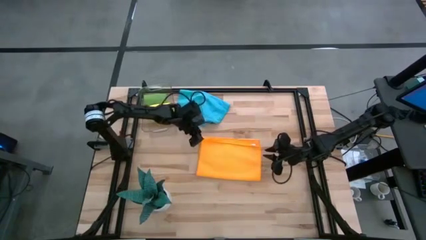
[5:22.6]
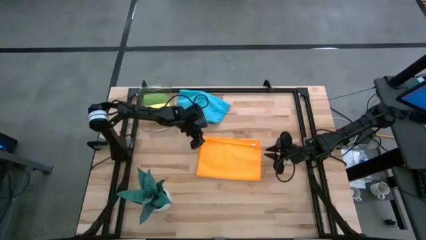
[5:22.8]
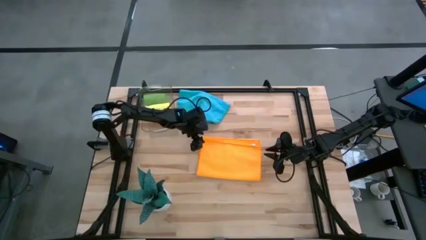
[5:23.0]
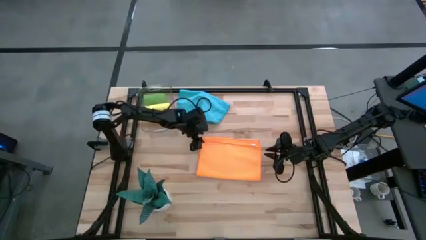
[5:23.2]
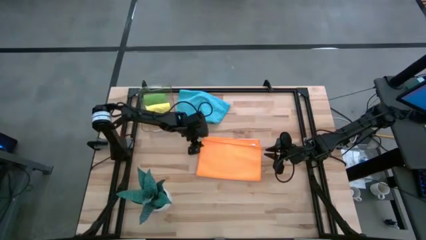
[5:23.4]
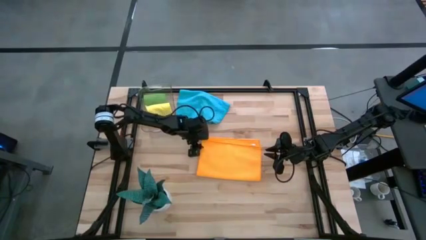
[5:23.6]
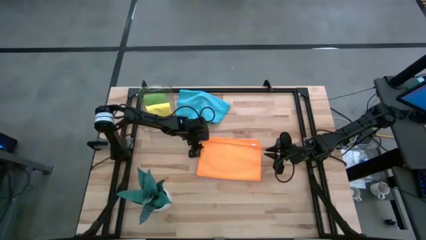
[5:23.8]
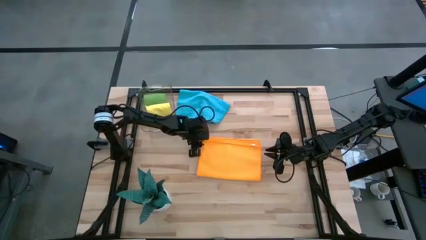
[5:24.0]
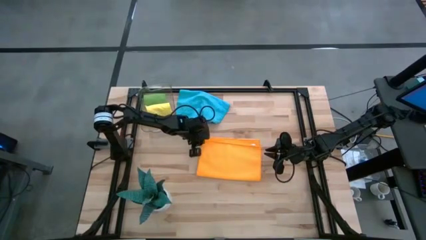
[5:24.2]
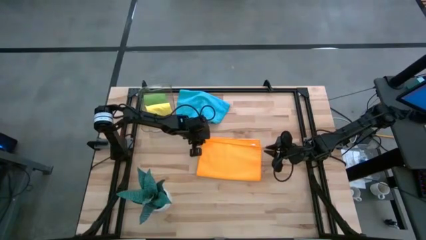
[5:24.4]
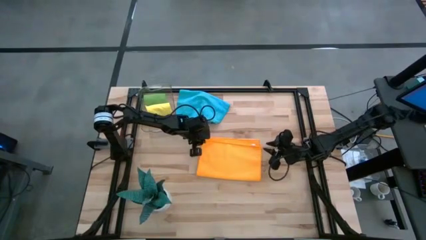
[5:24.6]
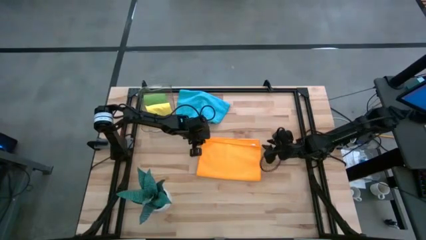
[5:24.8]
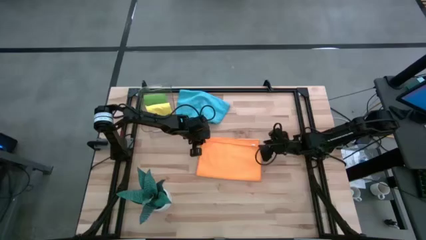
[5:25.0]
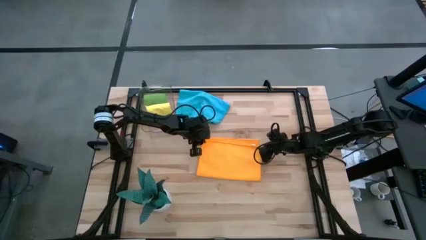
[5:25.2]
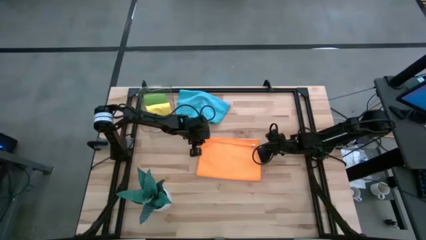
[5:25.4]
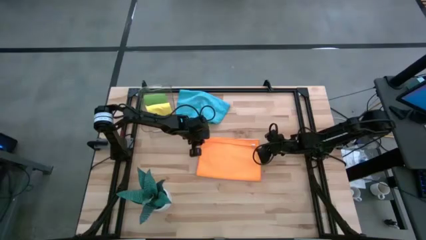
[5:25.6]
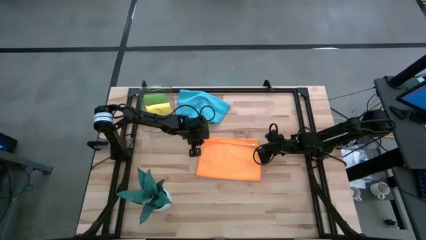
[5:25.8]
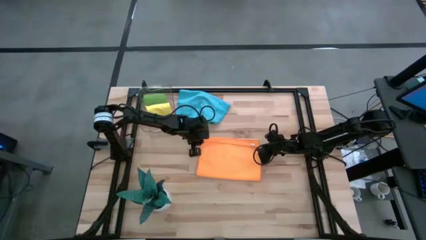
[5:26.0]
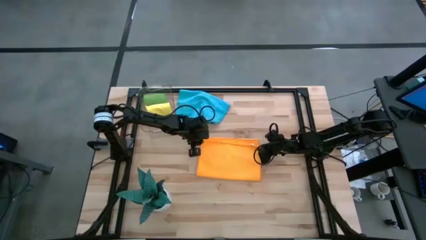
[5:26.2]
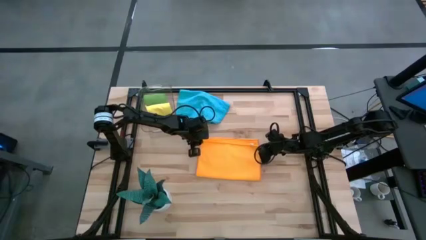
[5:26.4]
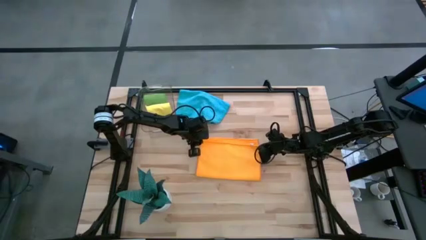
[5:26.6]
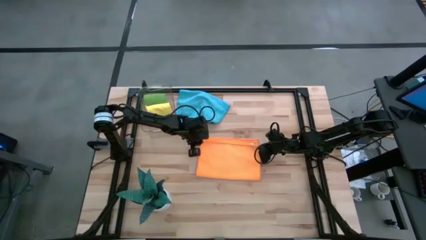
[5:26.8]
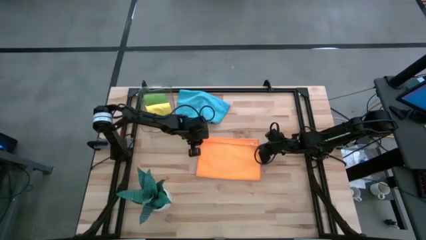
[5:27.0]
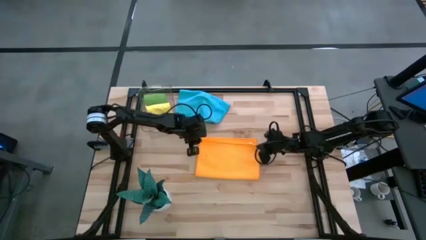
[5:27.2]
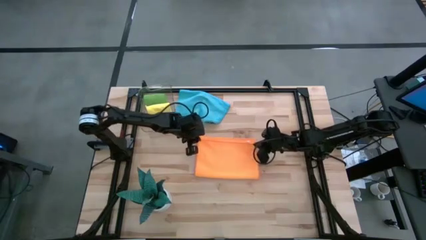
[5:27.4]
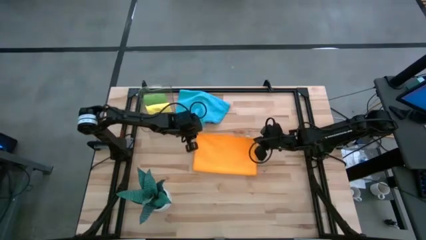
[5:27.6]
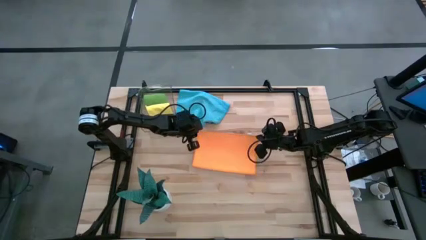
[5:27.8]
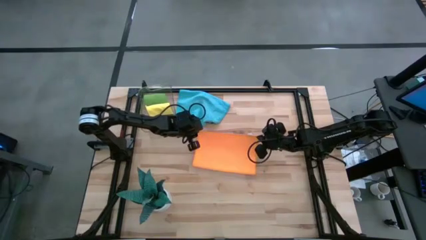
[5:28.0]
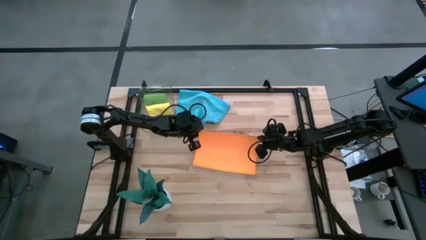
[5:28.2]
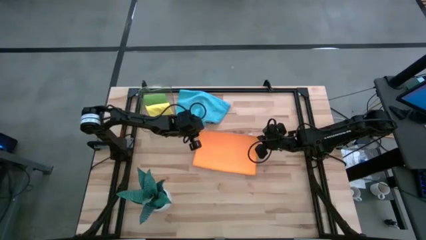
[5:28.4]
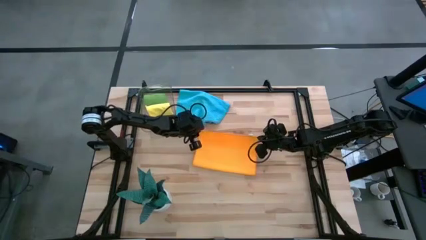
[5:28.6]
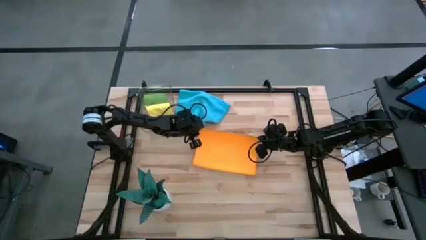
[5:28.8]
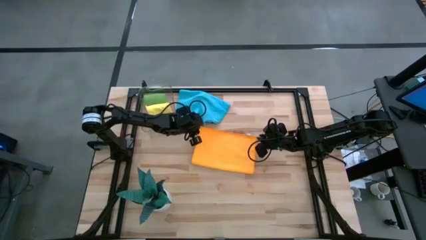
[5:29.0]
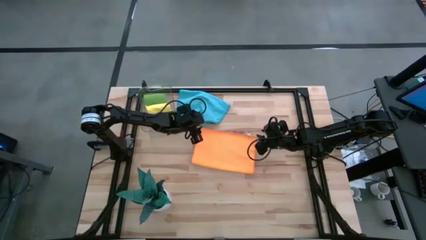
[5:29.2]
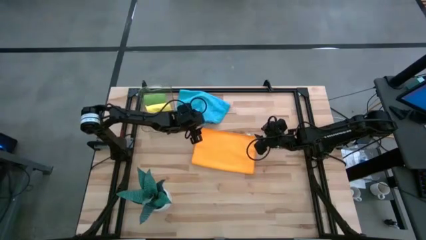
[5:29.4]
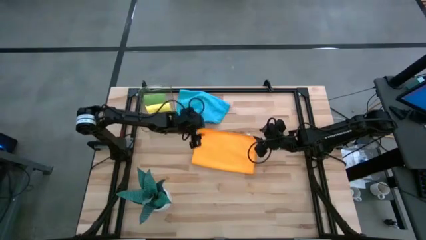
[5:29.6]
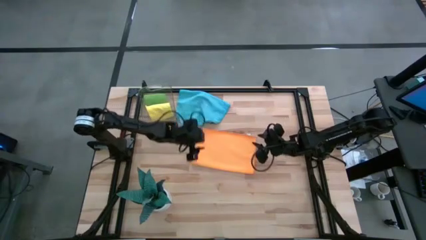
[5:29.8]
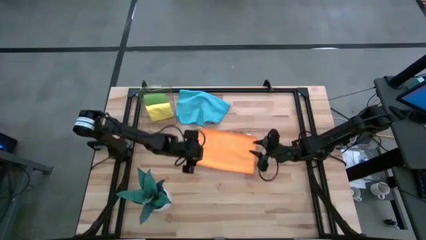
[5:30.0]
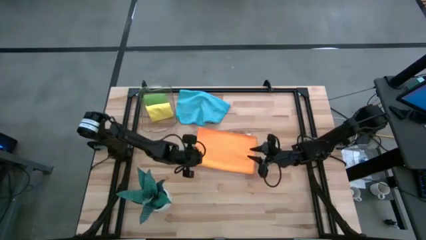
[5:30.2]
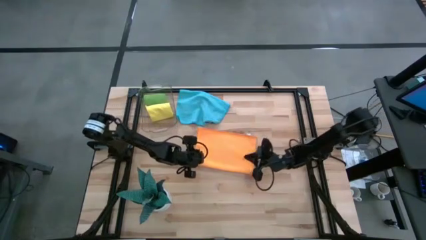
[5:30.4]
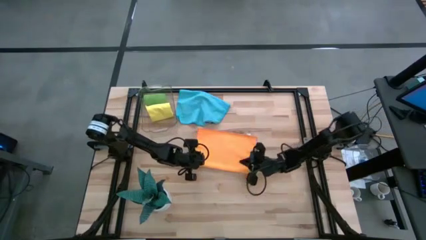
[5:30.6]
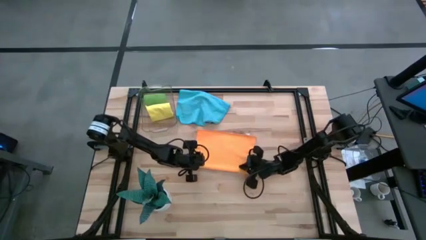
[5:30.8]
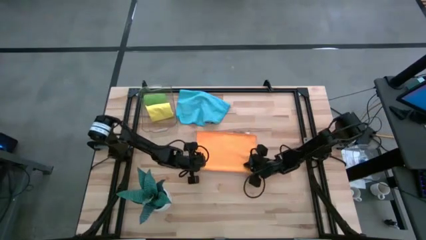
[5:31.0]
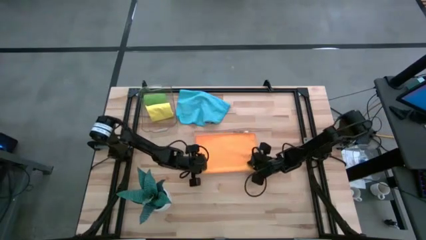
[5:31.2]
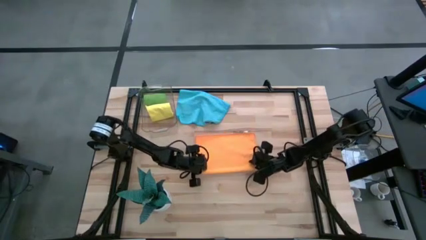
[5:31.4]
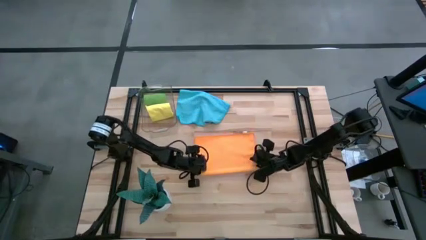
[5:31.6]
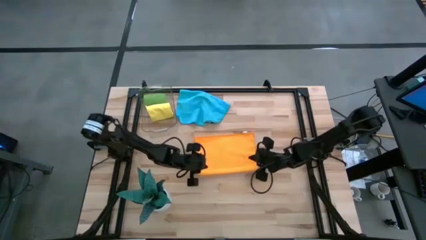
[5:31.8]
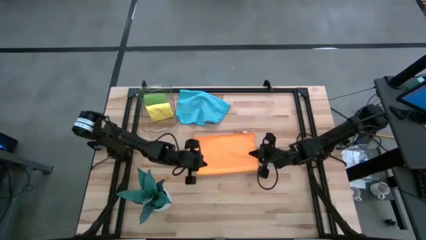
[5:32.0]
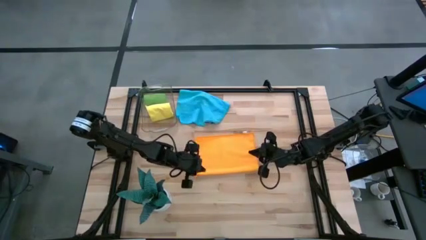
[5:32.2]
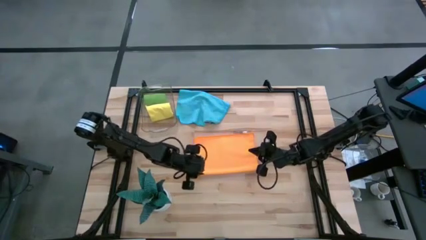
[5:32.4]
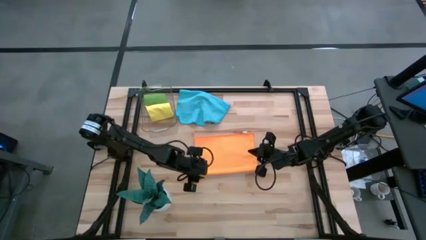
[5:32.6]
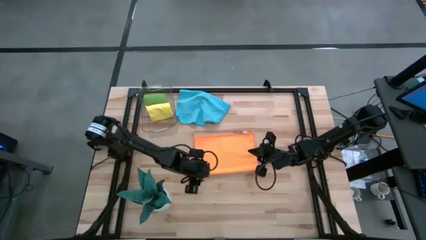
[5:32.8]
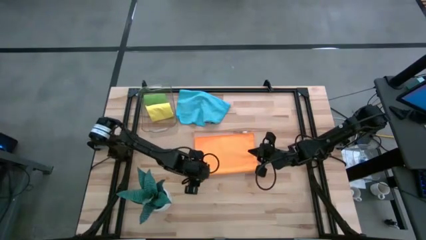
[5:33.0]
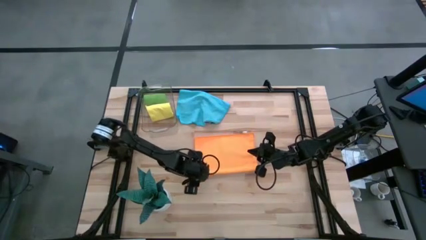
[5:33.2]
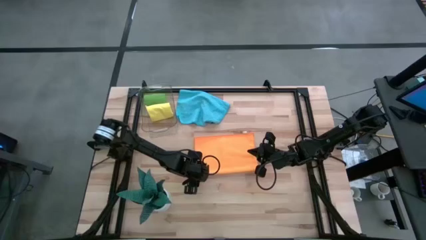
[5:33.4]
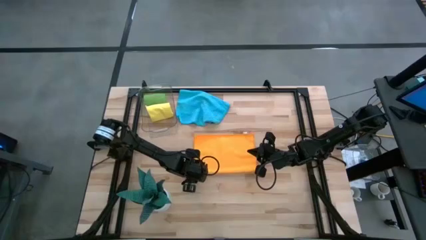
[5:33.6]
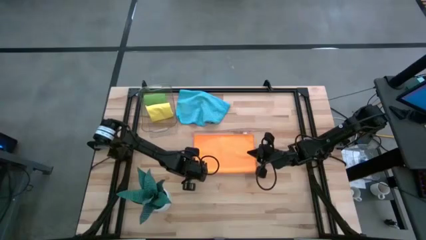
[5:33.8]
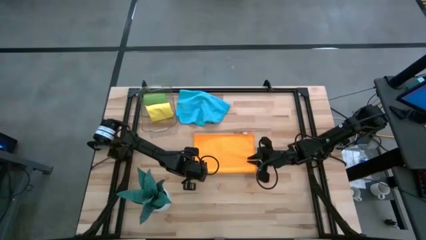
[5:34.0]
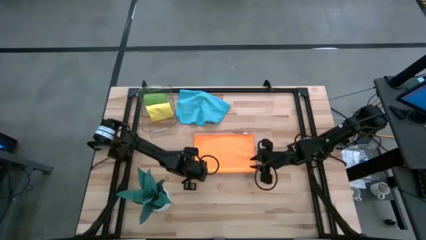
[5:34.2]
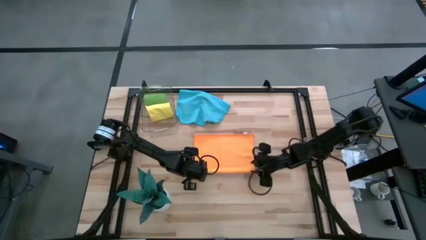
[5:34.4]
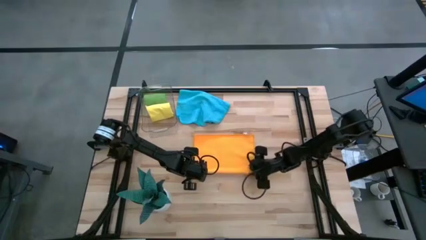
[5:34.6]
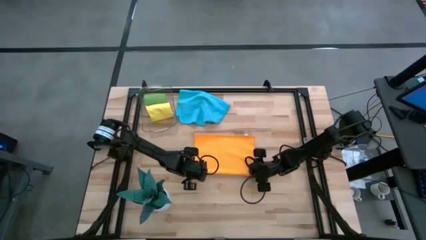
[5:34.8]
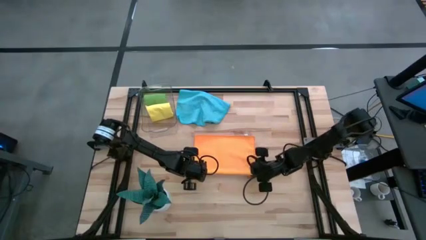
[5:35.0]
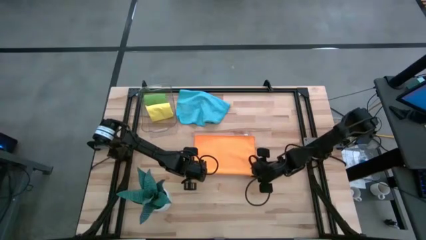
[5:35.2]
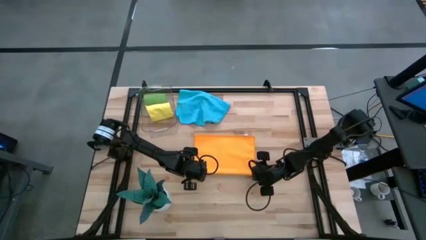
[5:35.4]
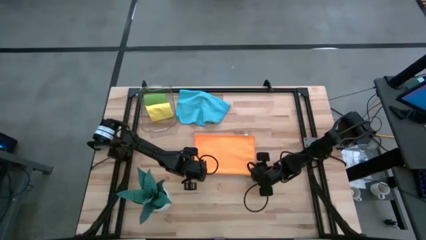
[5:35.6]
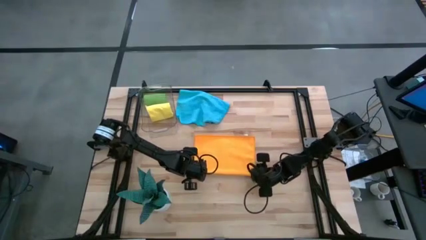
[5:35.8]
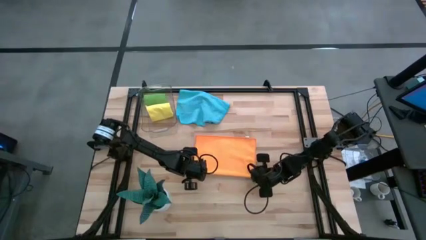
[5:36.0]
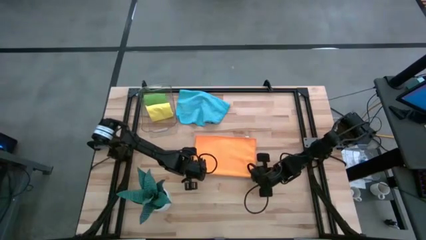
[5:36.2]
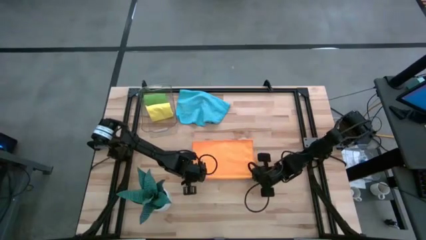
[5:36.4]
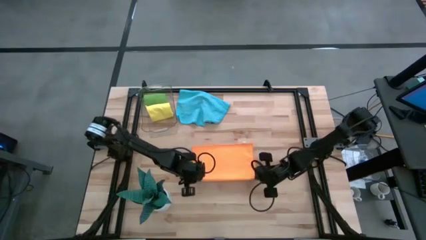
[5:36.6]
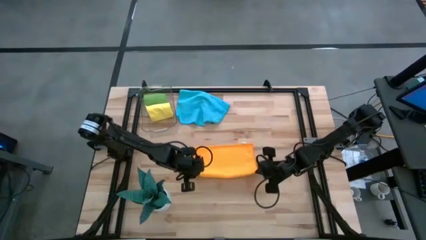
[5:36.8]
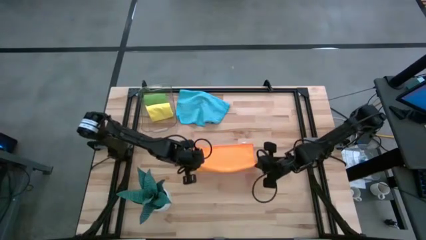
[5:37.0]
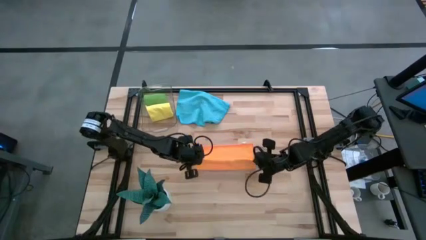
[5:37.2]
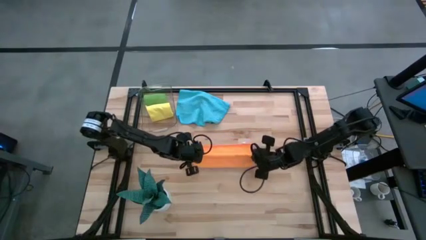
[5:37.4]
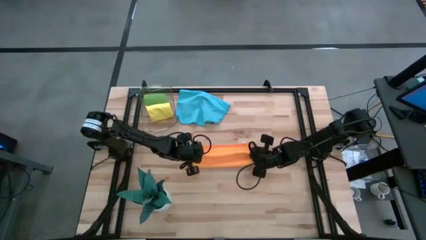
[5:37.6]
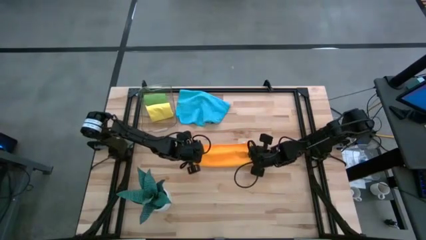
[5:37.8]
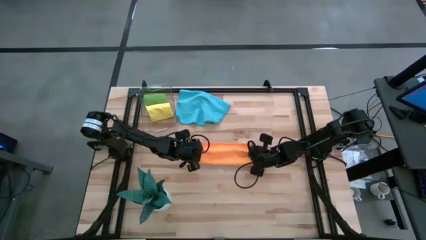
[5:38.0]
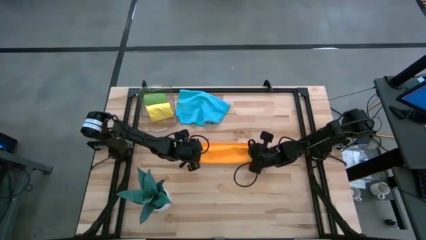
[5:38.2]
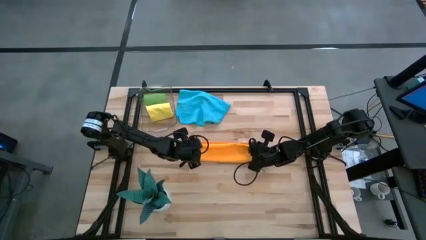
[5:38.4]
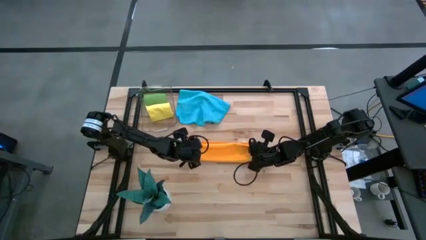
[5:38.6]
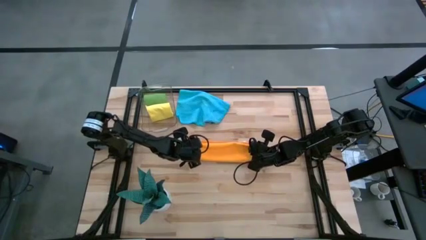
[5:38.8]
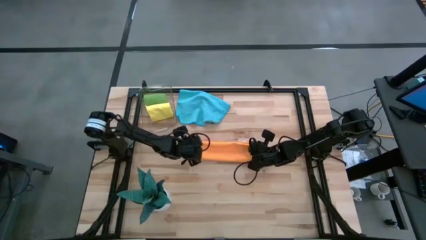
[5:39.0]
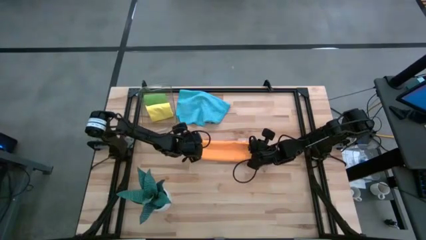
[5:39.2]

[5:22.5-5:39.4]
Task: Roll microfiber towels into tight, uniform cylinder then place into a basket
Fold the orange microfiber towel
